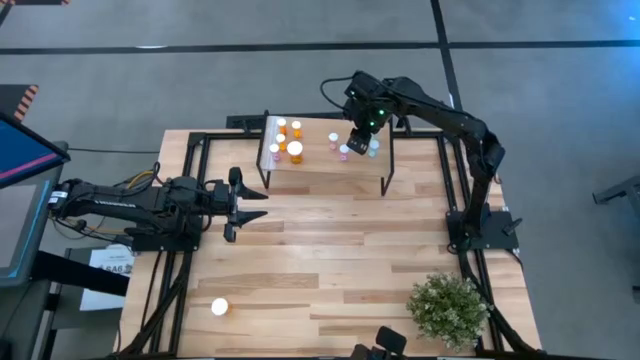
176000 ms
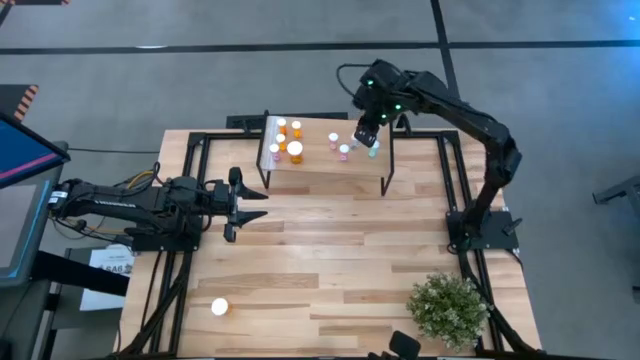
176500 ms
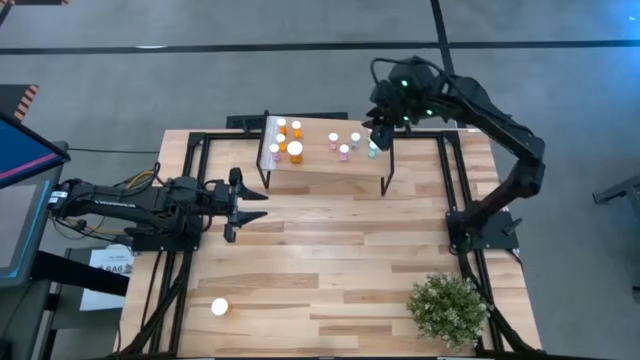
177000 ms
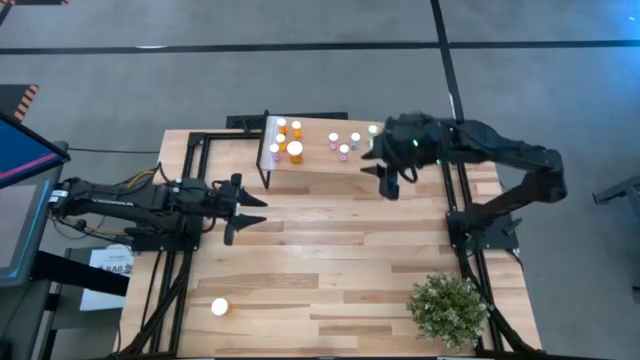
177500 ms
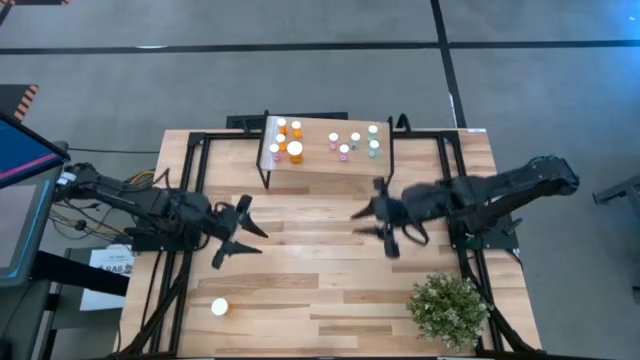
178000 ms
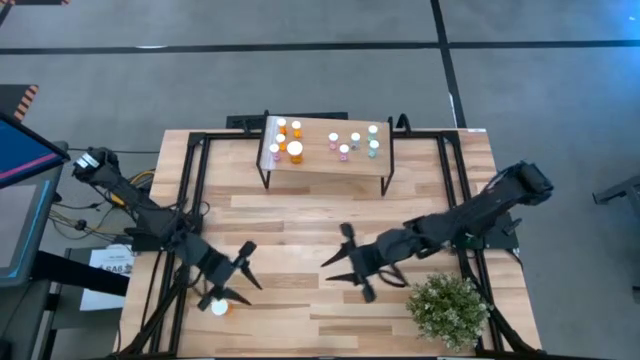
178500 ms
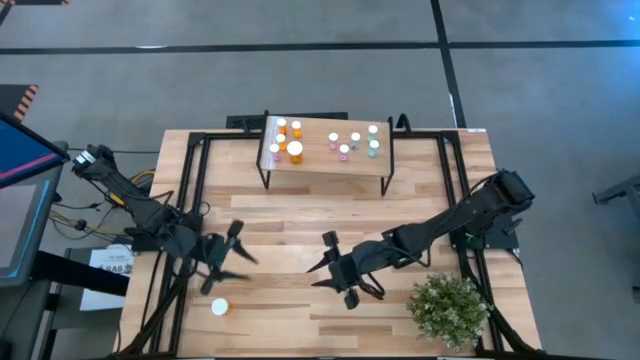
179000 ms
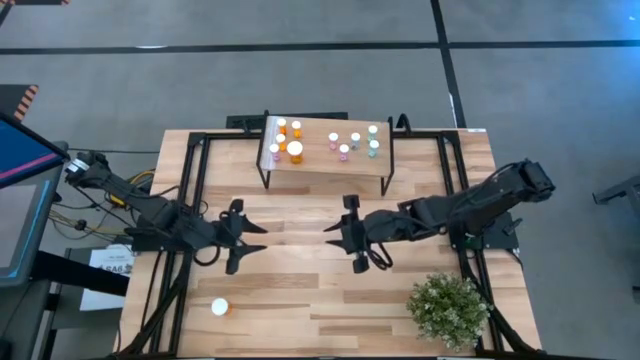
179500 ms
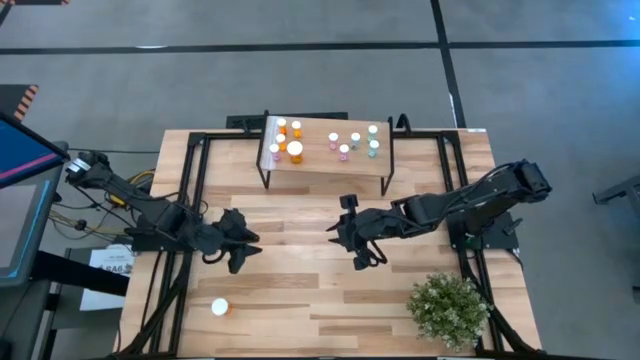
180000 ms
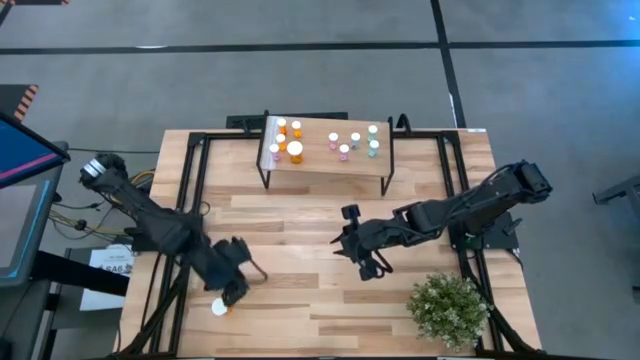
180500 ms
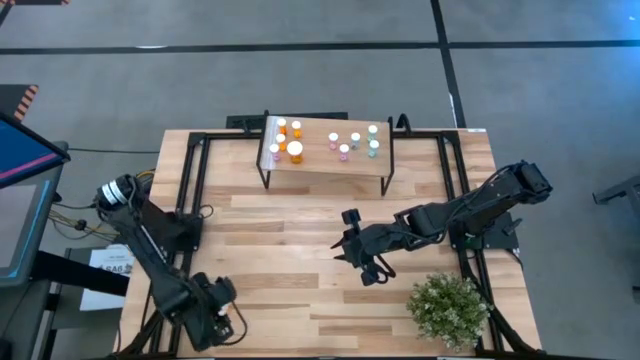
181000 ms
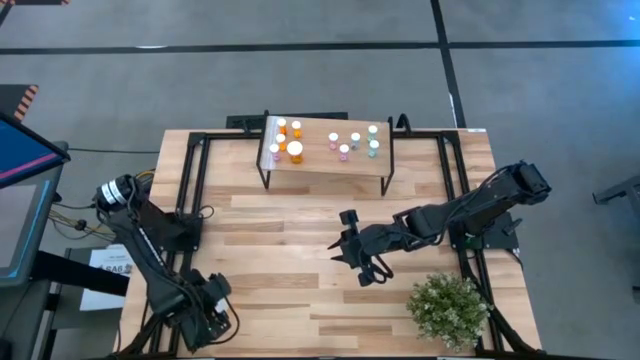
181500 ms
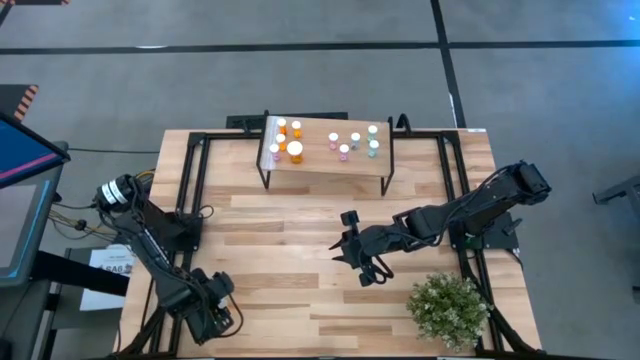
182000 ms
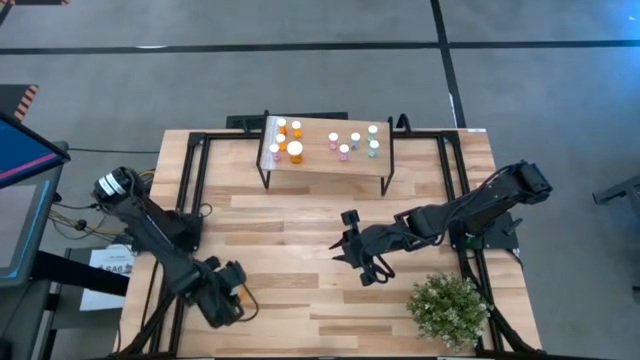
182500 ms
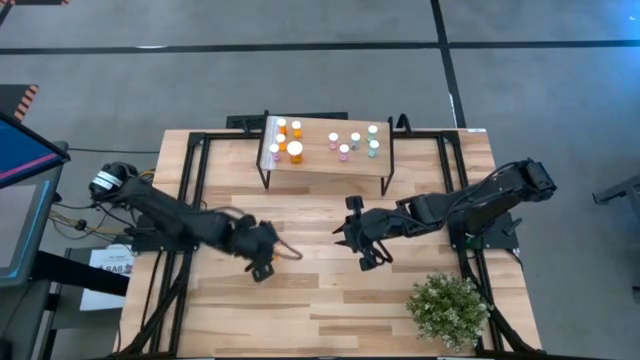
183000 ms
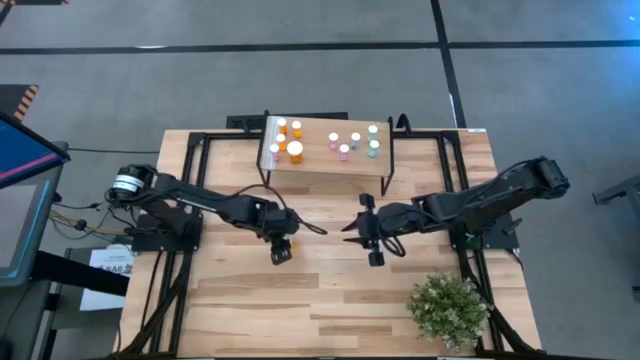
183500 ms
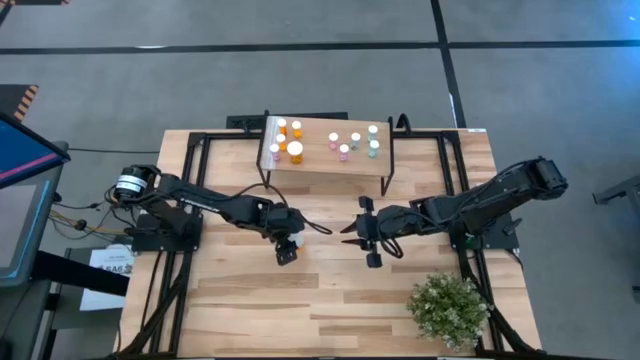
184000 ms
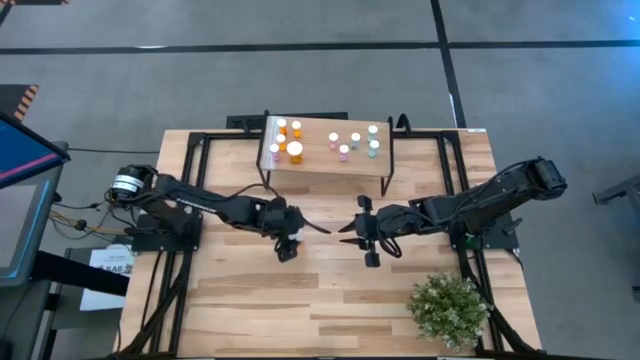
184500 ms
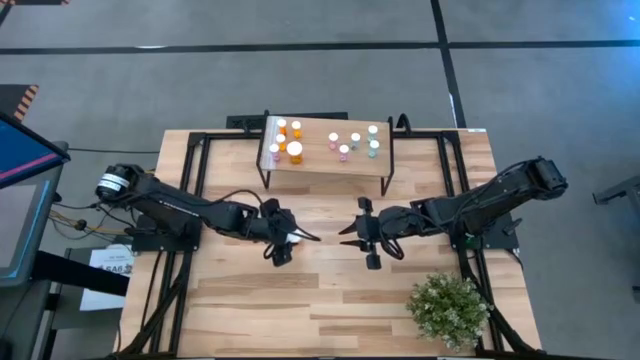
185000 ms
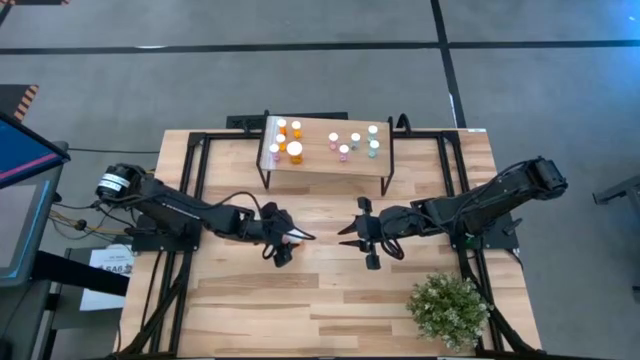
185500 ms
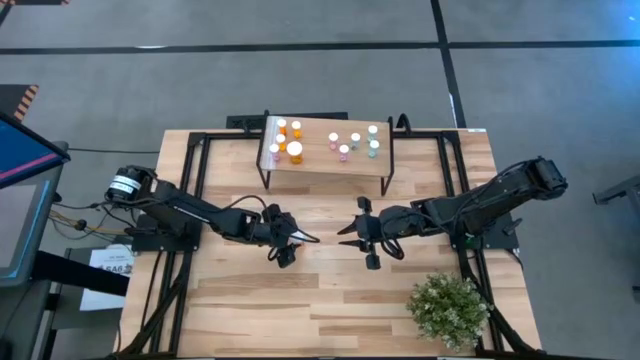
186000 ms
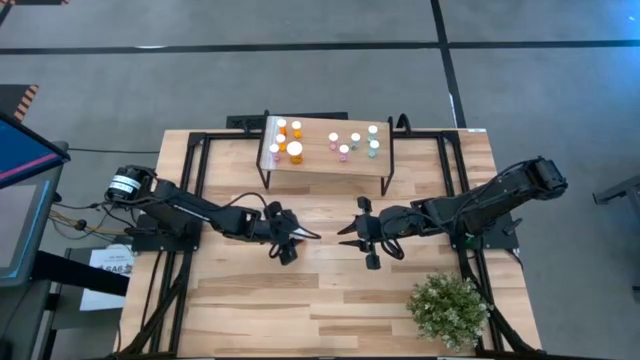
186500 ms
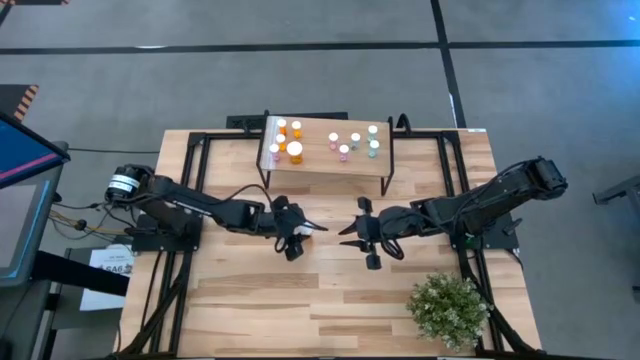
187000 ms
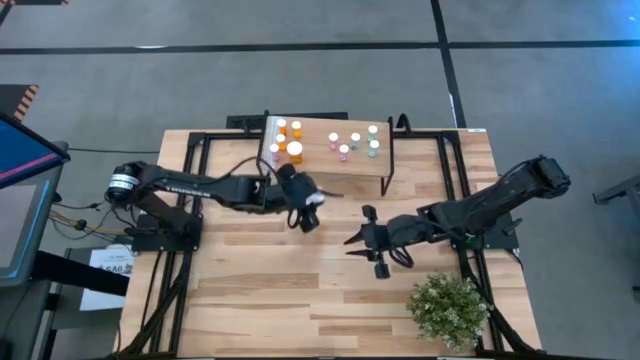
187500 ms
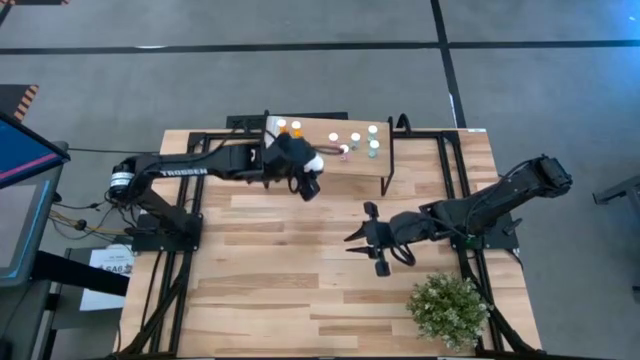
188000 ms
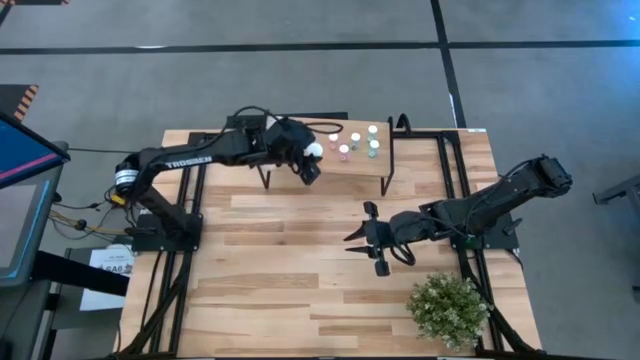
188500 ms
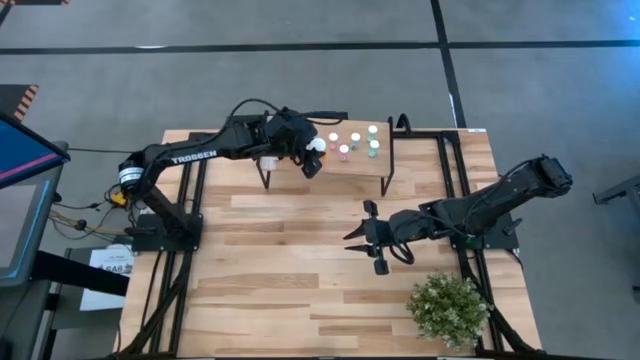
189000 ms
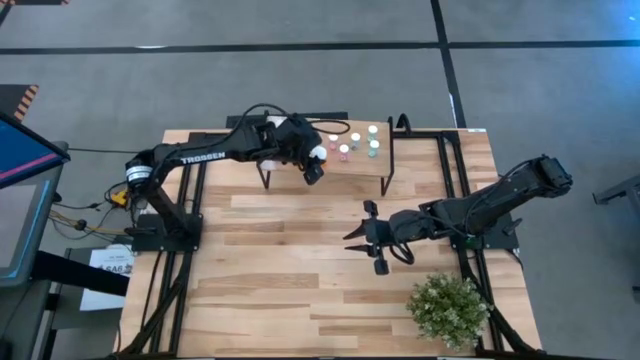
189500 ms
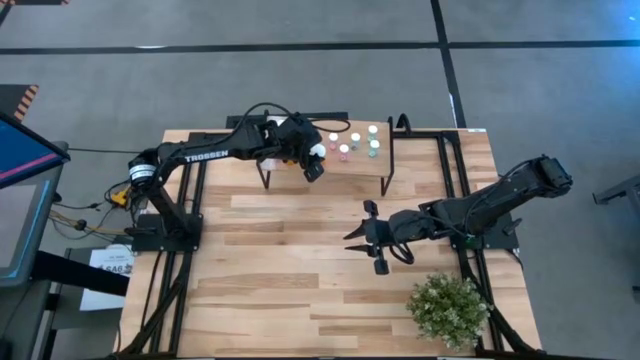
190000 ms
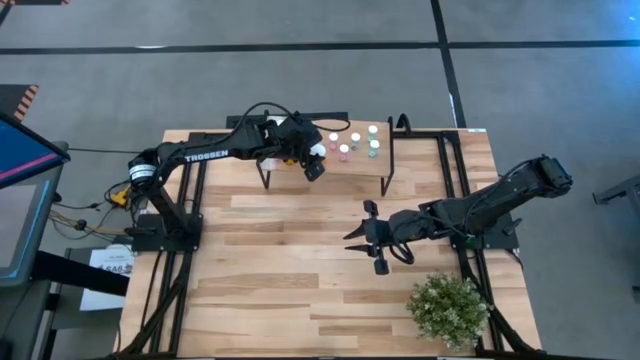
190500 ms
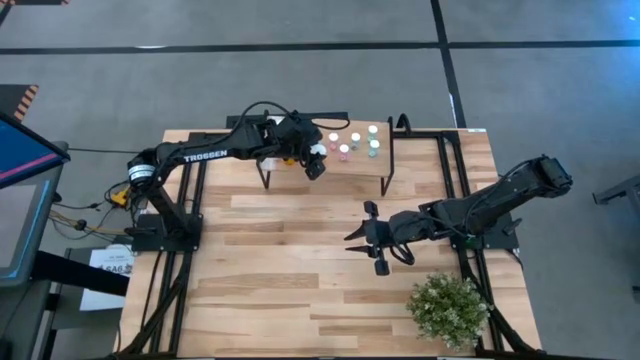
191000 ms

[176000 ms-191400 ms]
Task: Pick and place medicine bottles onto shelf by color
Put the large orange pill bottle on the shelf

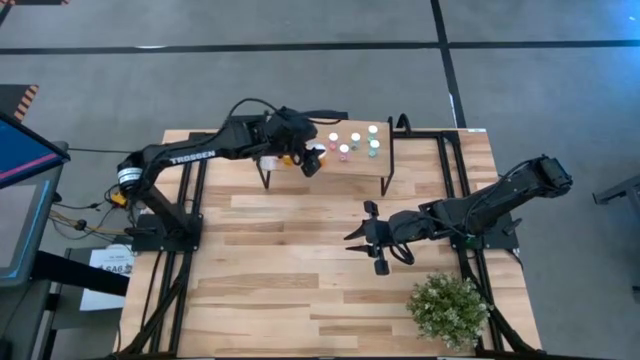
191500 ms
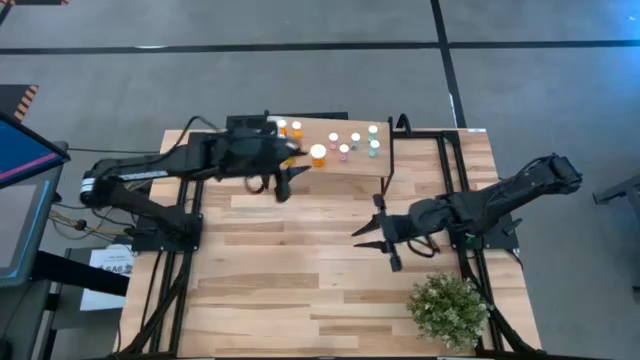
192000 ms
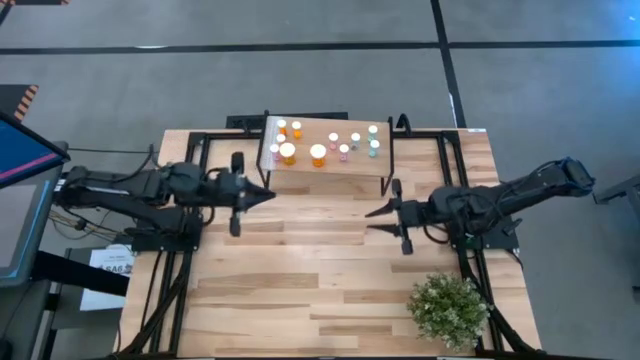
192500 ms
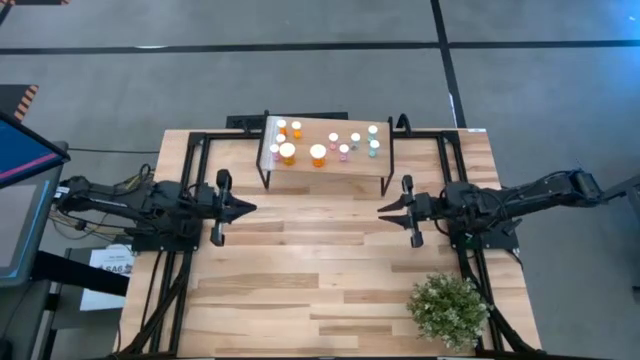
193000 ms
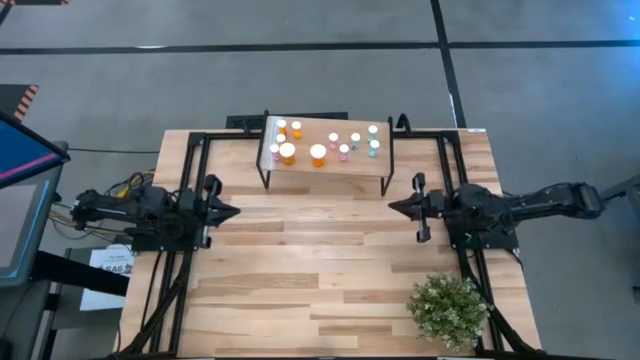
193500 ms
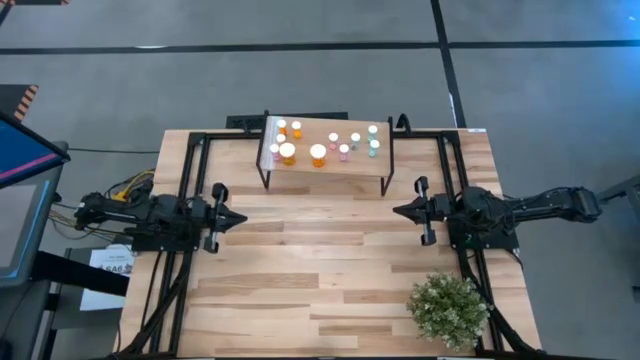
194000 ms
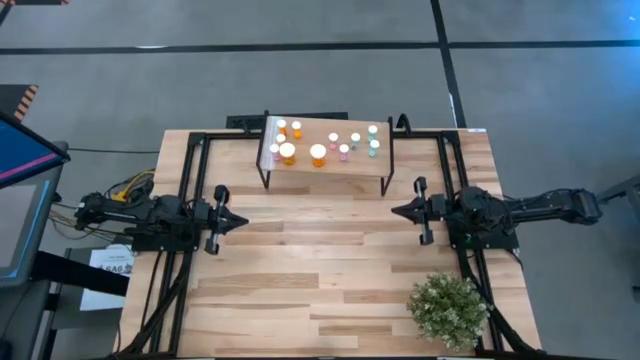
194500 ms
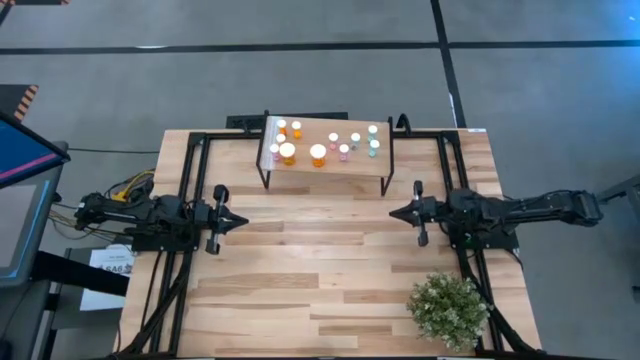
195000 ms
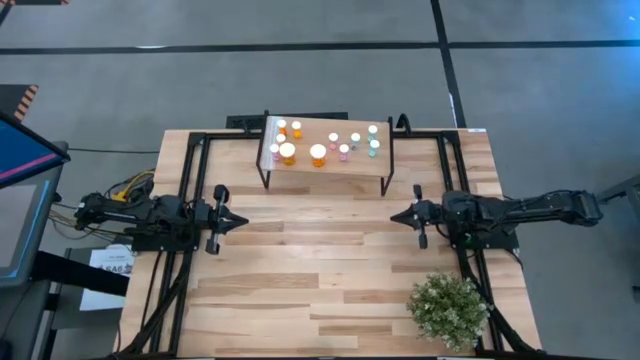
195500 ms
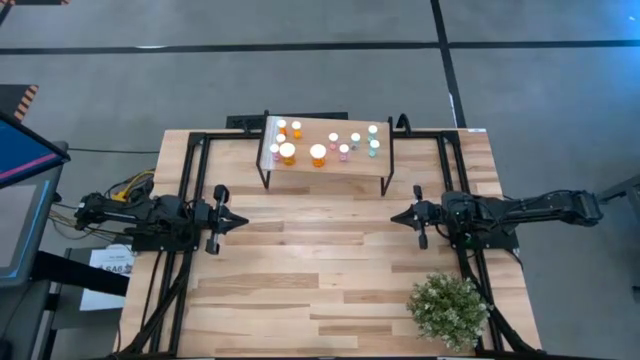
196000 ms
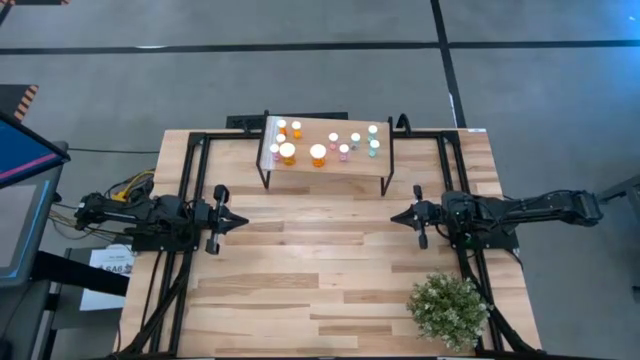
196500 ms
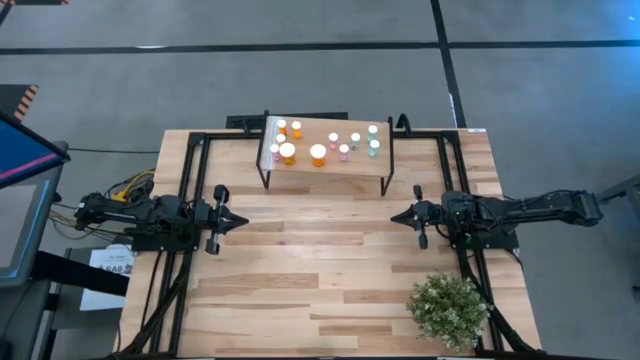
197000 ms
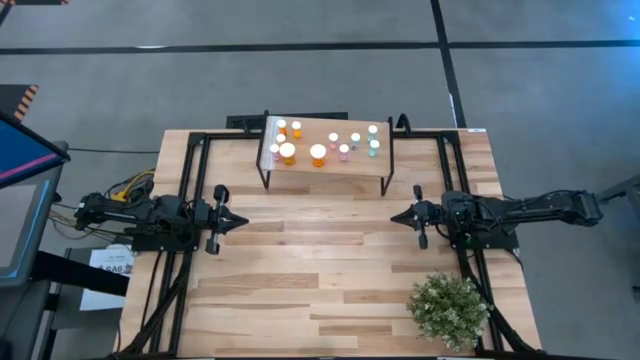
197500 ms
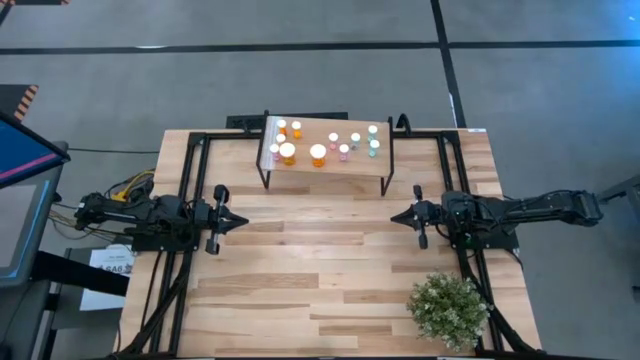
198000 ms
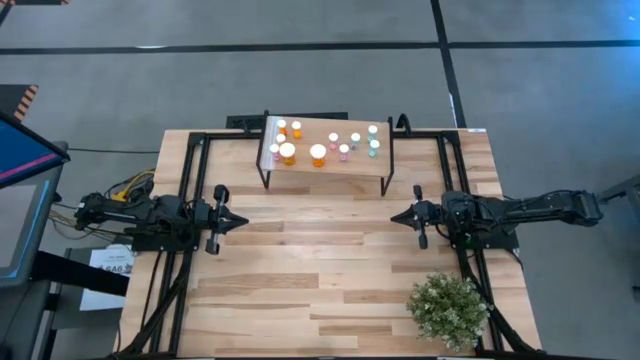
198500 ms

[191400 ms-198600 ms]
Return to Home Position
